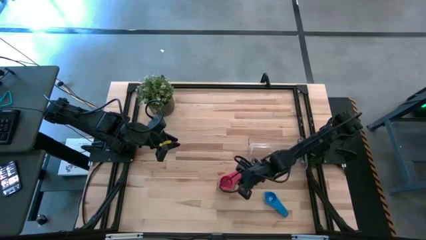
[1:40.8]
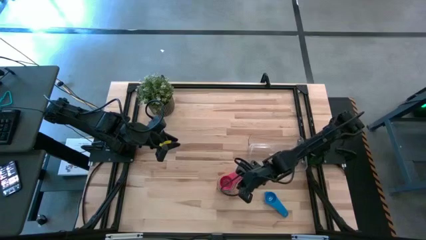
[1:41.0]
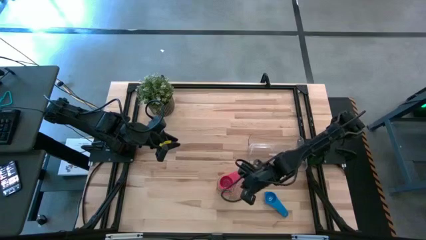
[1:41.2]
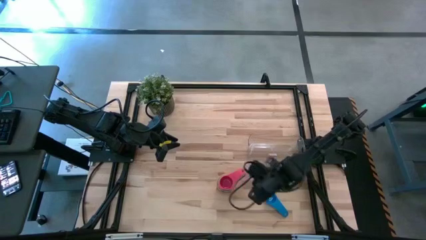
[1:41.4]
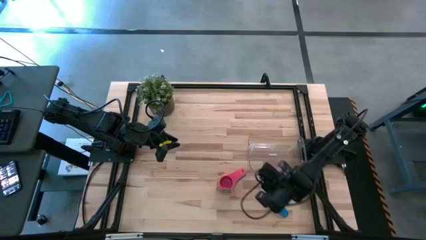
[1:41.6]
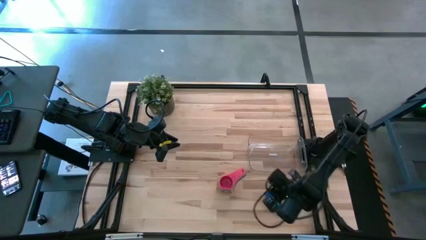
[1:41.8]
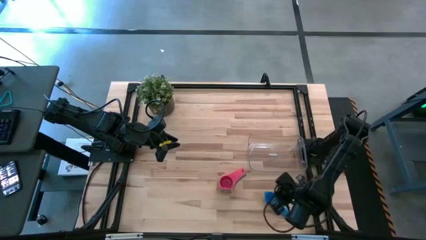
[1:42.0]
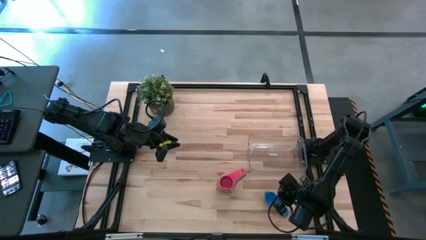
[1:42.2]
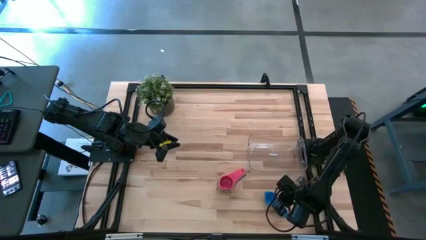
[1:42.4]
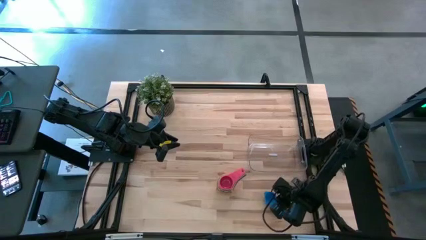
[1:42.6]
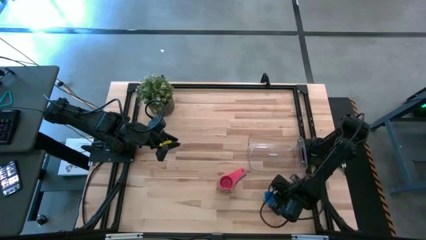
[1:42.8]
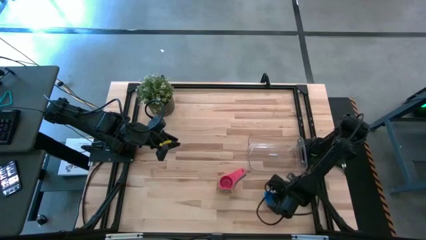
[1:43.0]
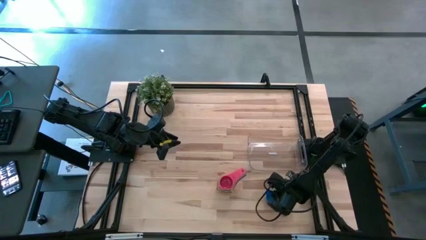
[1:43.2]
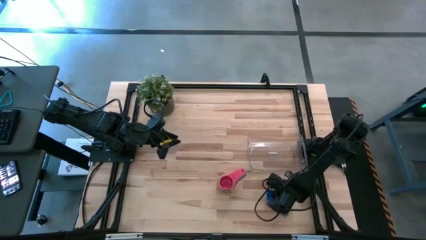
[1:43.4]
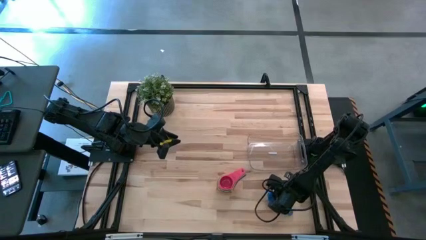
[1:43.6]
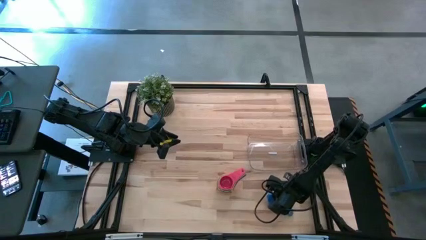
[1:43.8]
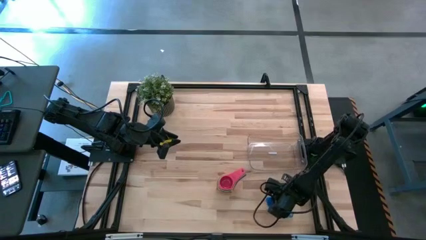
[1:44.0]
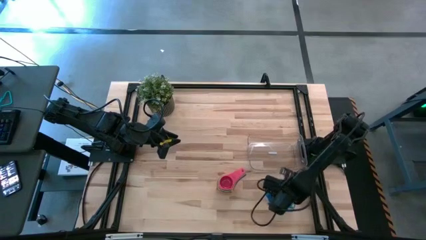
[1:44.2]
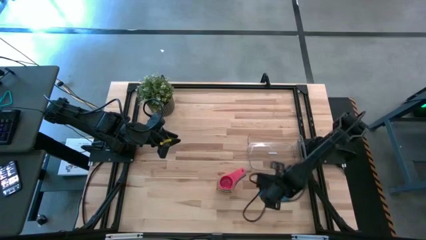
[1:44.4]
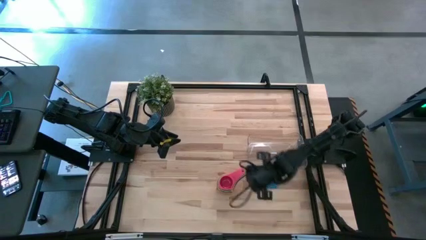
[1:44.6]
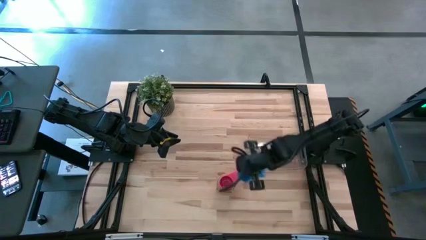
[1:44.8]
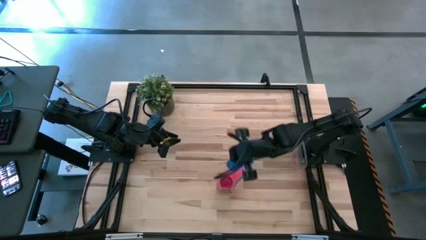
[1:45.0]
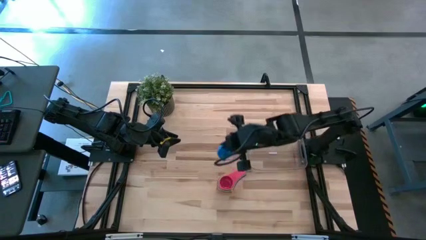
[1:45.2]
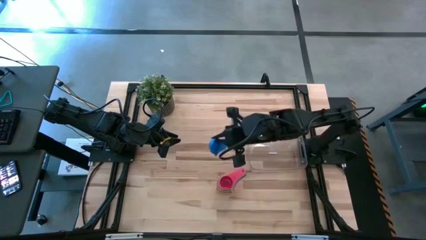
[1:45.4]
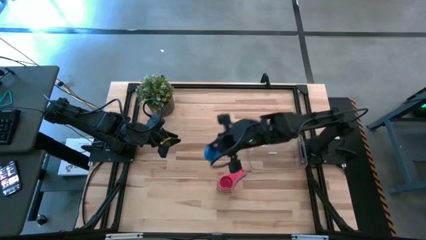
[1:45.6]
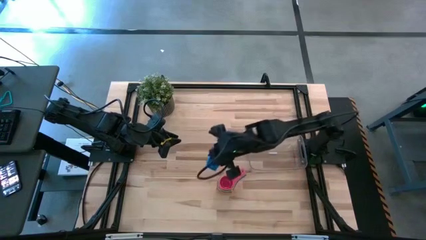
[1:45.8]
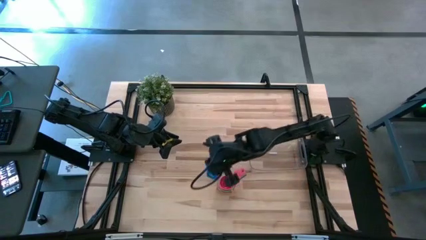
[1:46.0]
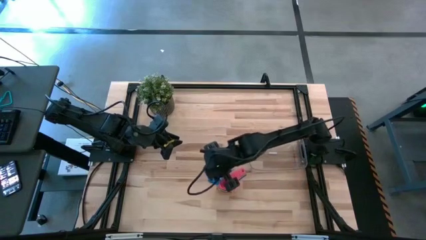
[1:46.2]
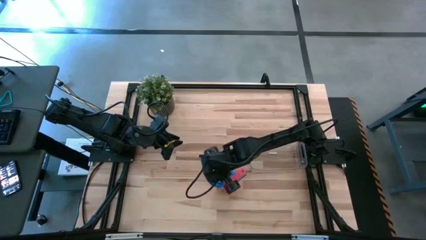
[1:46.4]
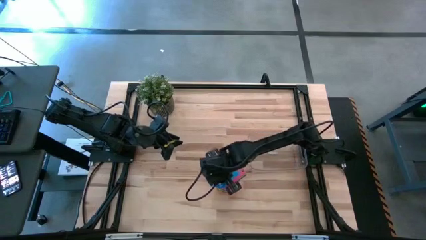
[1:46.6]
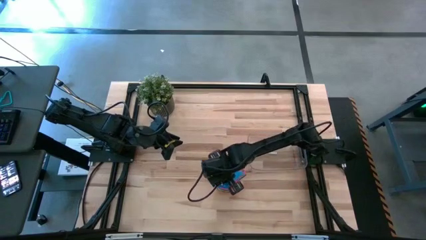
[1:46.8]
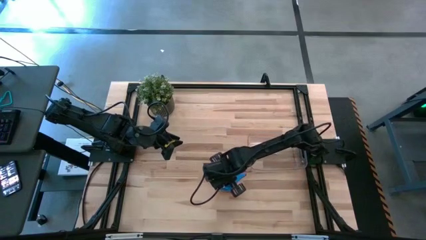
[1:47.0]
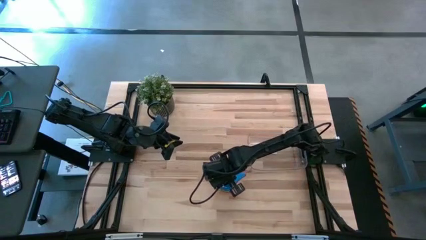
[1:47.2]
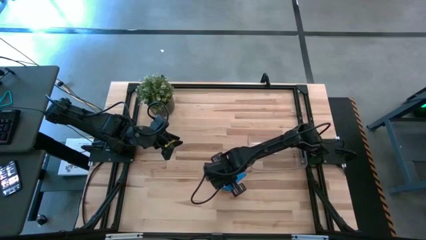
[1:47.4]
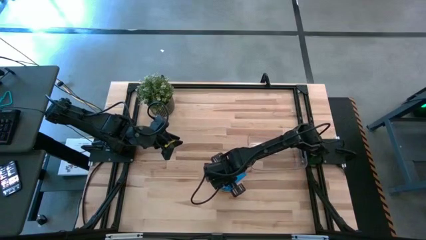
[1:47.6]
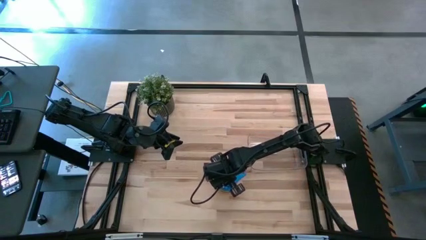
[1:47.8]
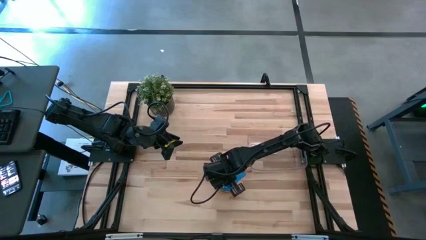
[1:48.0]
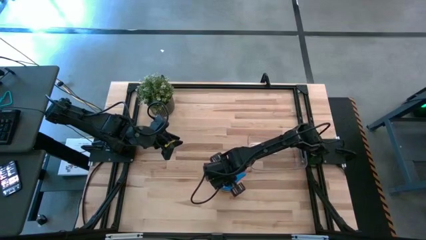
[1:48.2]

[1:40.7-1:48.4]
Task: Nest measuring cups in basket
Stack the dark blue measuring cup on top of the red measuring cup

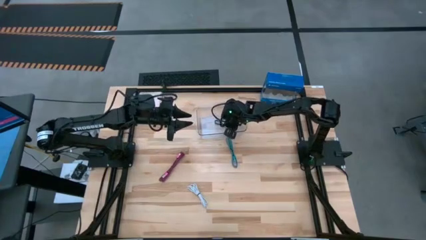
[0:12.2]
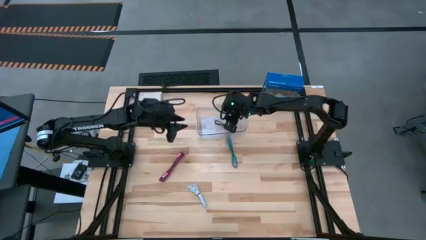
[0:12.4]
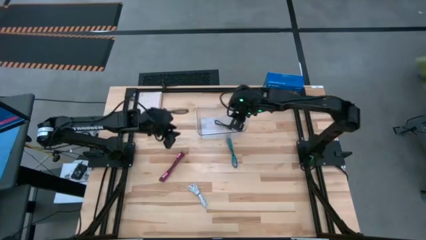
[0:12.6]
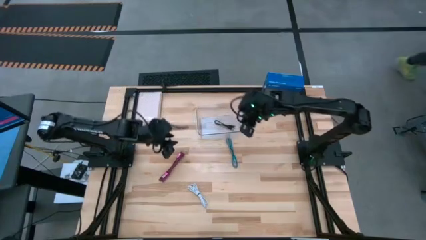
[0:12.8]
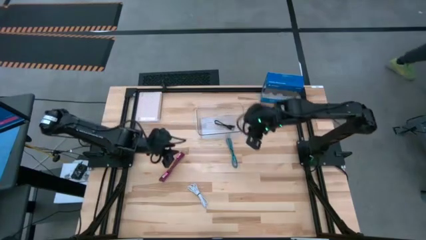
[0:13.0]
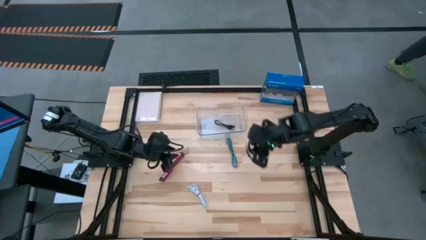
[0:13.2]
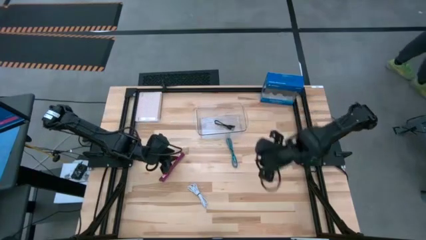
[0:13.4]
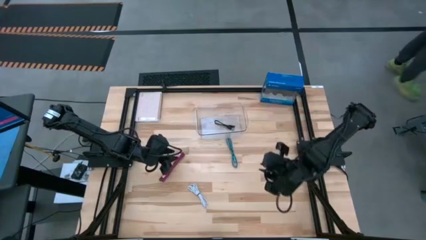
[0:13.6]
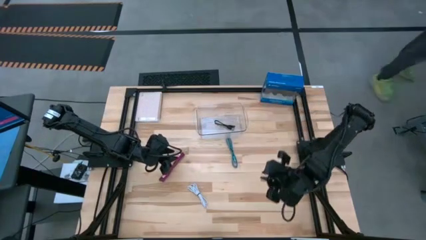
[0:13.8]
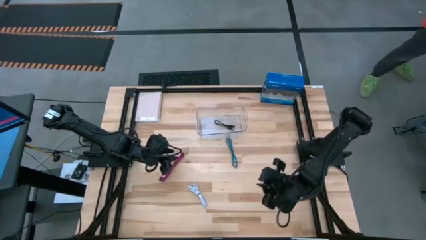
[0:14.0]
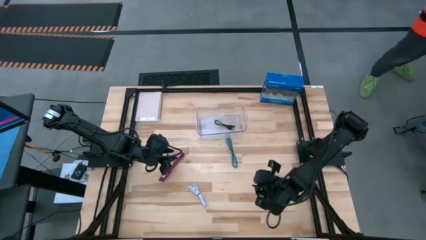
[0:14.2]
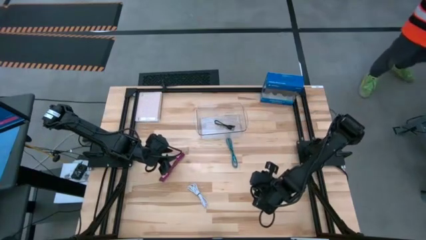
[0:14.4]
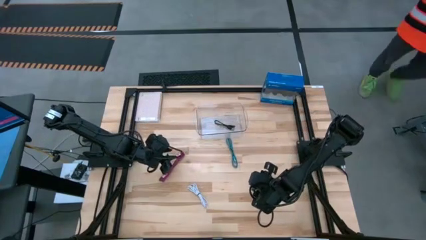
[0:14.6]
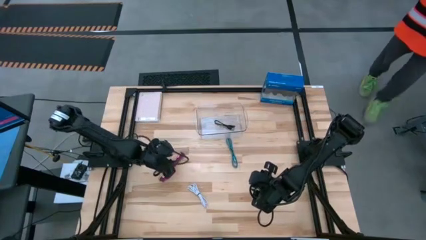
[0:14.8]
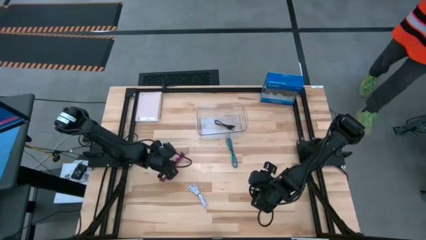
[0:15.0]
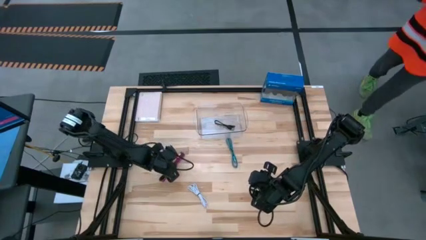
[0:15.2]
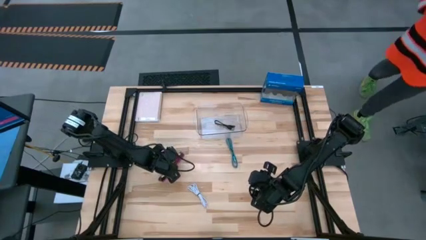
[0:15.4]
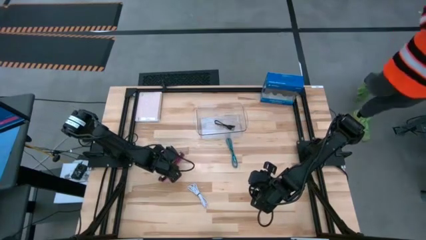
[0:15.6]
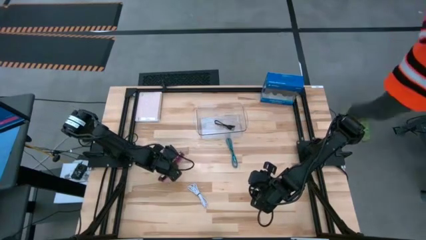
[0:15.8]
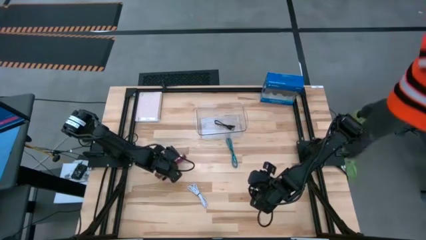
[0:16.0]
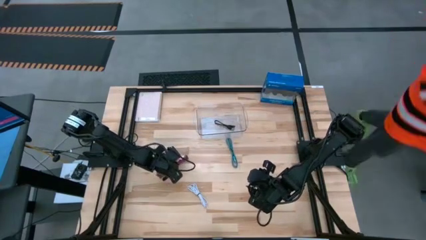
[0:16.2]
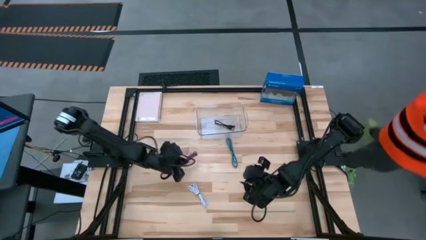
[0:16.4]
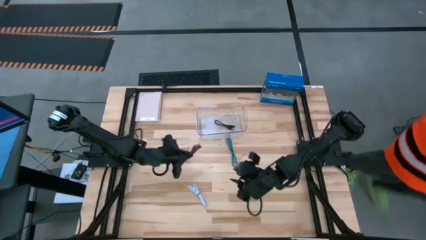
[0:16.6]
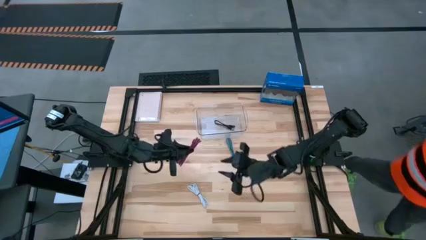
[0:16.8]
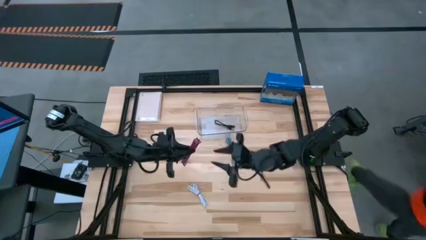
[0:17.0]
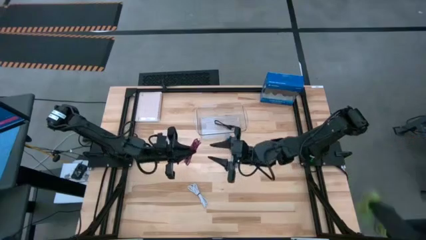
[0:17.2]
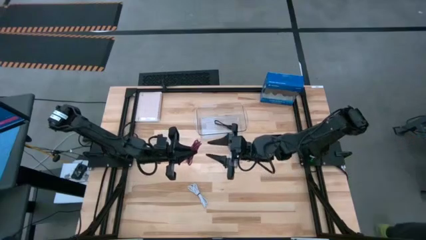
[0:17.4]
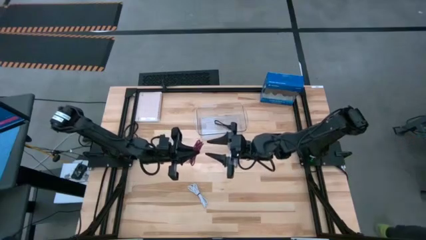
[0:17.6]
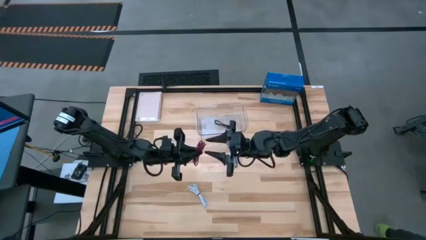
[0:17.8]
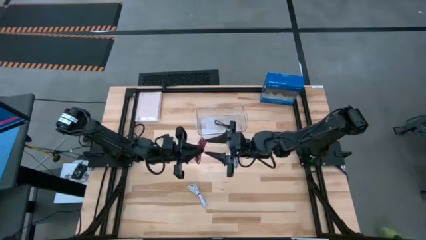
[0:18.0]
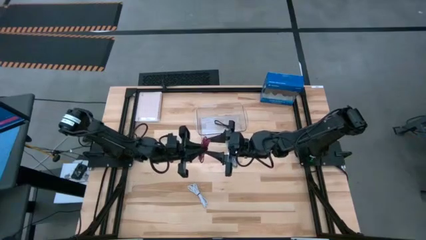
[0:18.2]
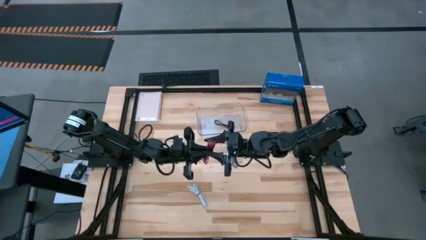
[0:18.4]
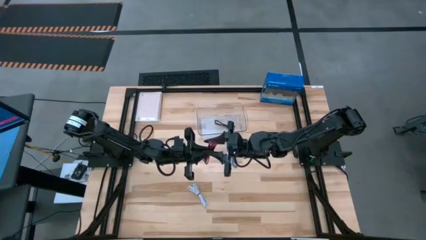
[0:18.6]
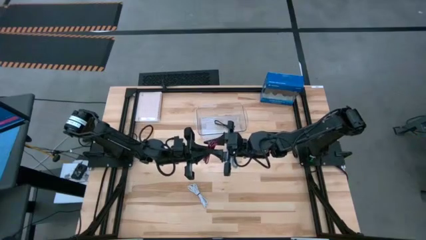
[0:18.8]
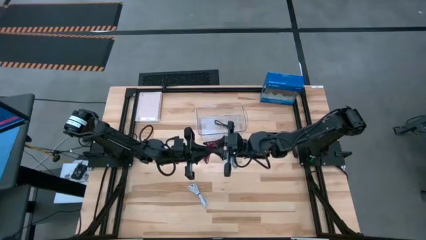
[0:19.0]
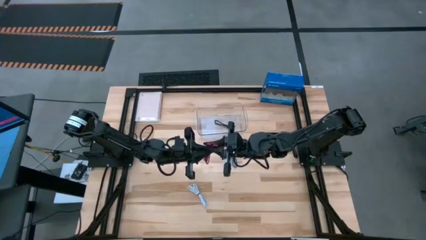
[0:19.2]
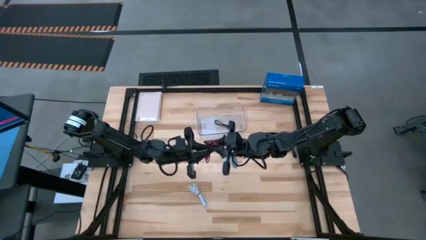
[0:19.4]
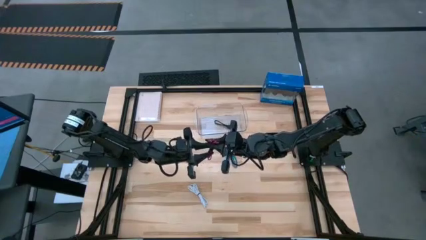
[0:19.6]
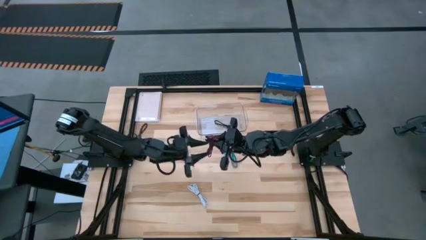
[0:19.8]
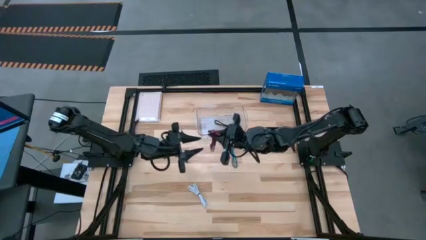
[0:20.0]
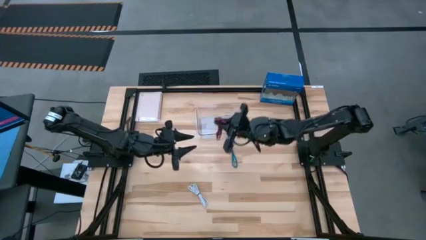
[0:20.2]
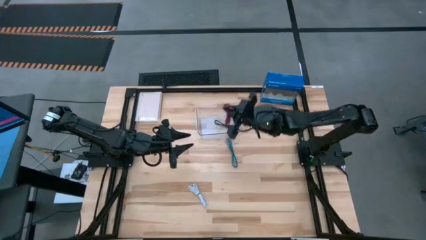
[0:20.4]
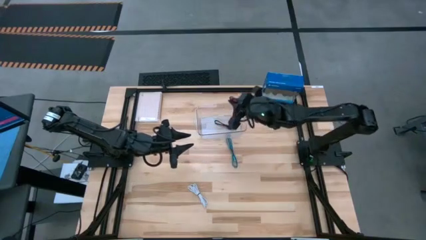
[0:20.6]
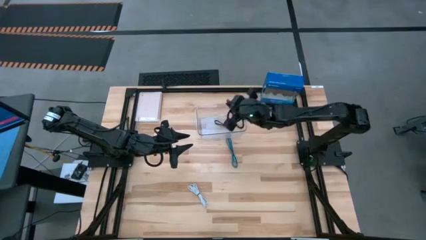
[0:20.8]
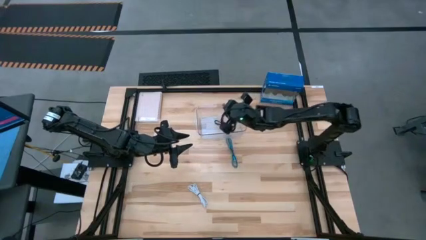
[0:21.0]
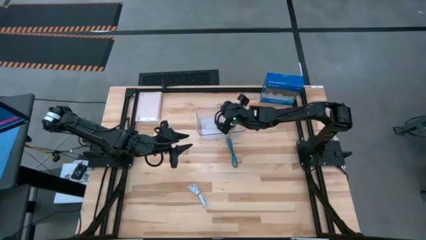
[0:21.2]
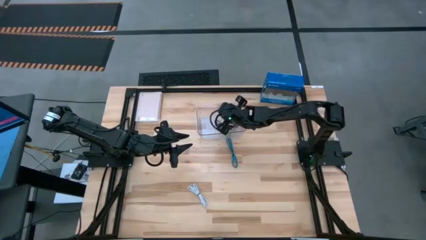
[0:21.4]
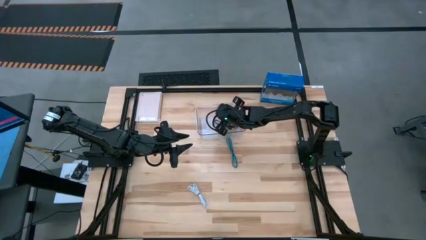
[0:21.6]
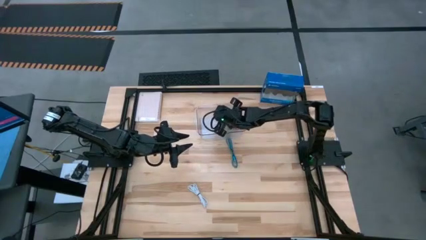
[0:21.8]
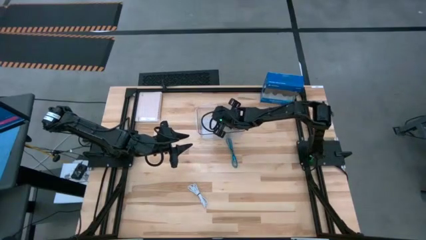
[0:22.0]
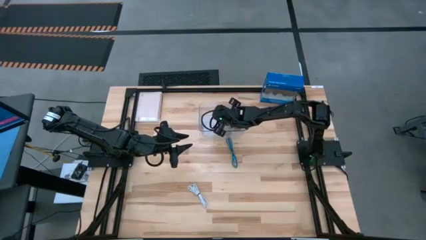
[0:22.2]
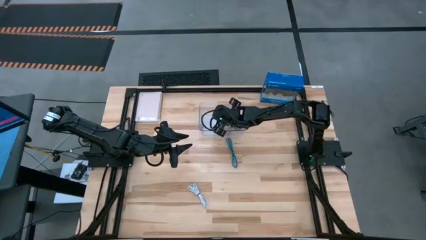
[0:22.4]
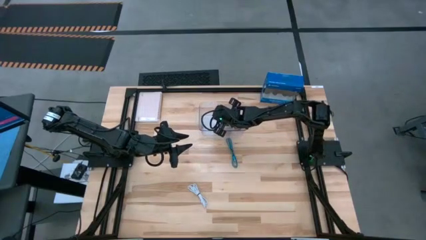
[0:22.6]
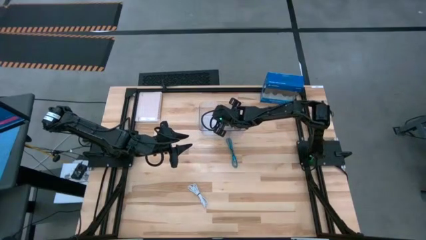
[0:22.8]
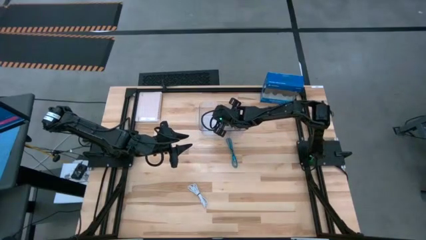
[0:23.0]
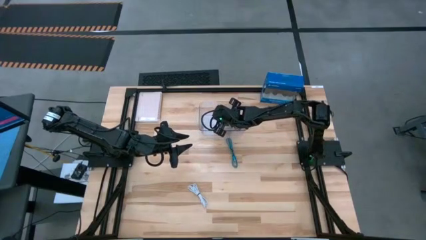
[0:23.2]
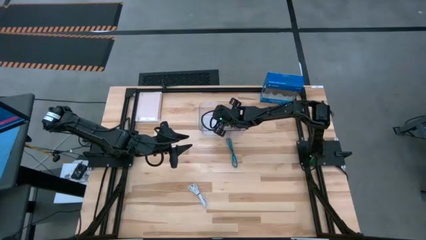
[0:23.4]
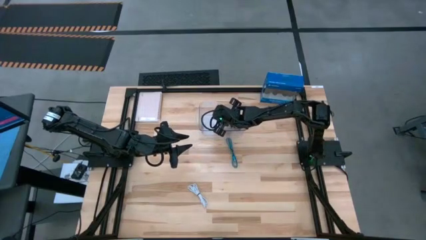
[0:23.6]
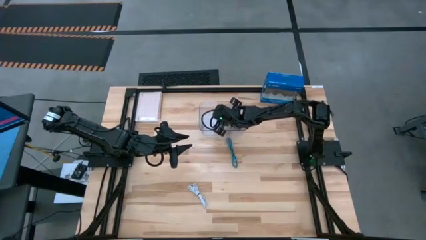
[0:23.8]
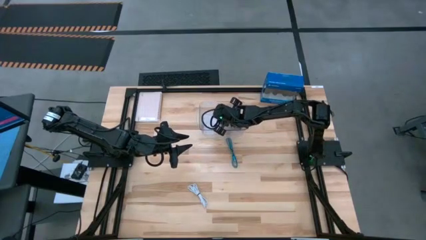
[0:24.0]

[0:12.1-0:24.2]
Task: Pick and place USB-C Cables
Put the pink charger cable into the transparent bin
